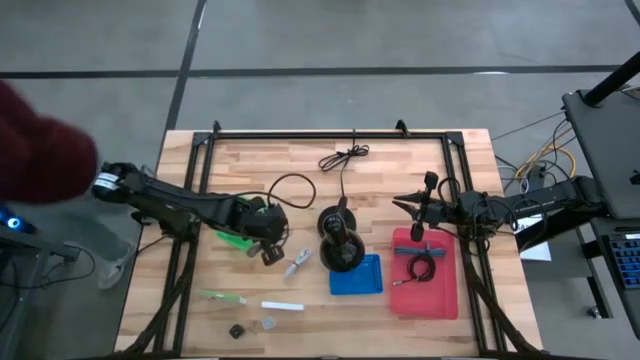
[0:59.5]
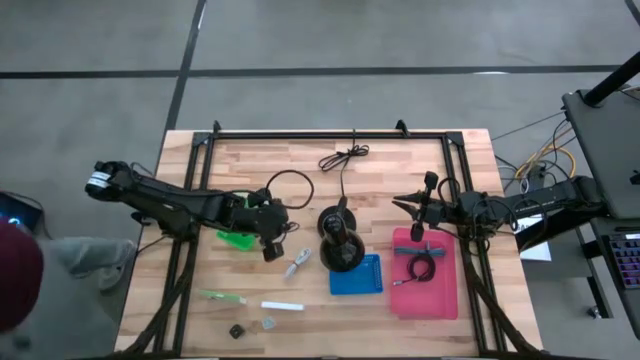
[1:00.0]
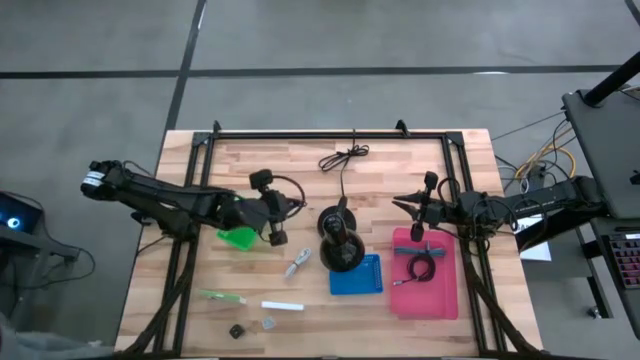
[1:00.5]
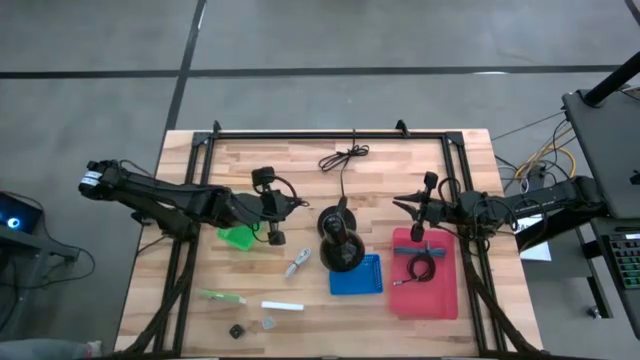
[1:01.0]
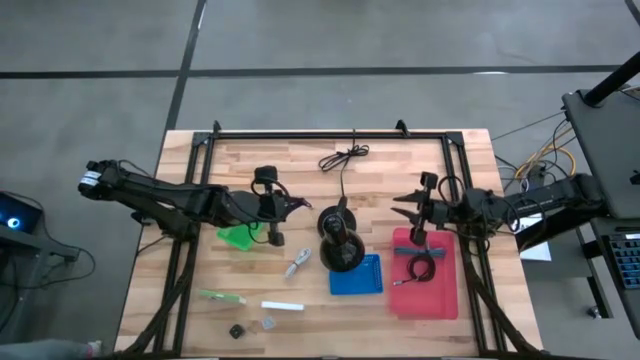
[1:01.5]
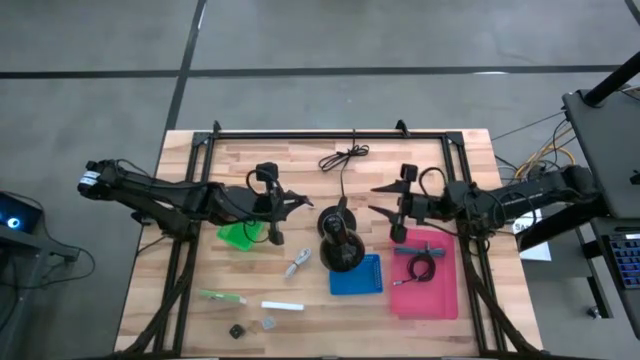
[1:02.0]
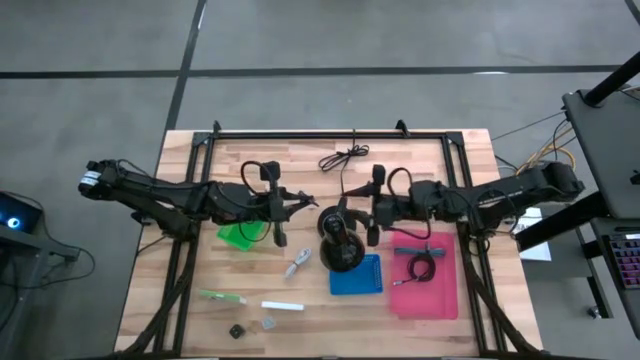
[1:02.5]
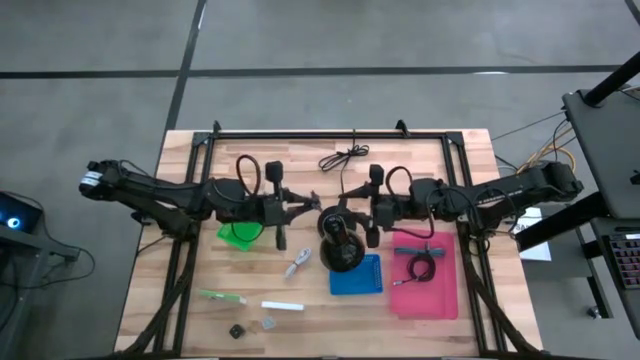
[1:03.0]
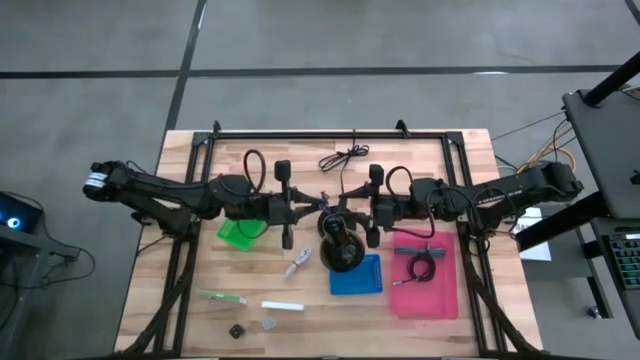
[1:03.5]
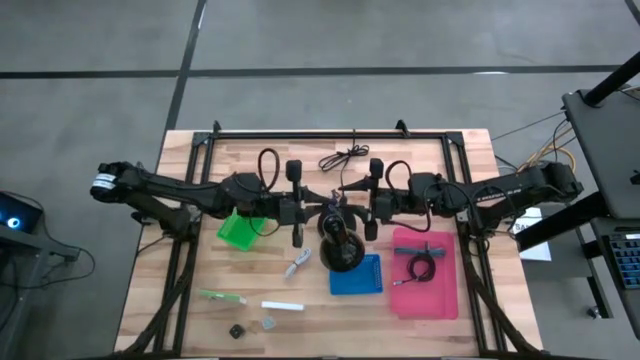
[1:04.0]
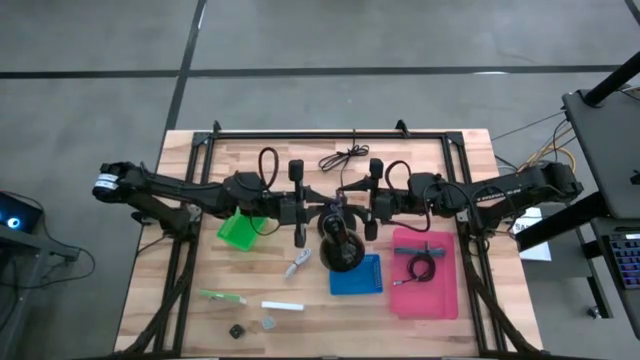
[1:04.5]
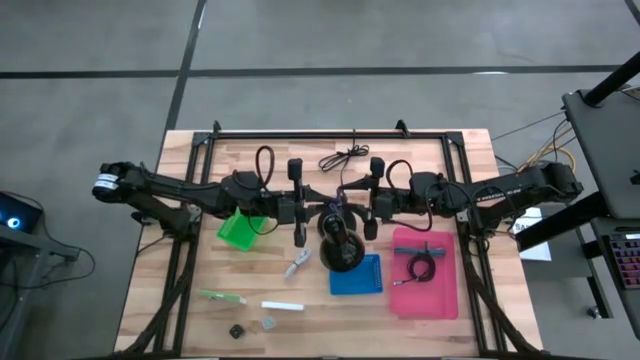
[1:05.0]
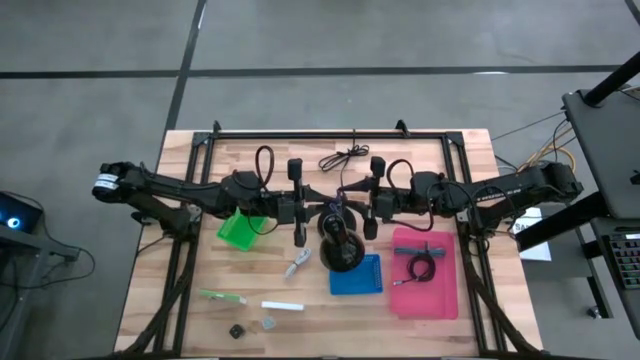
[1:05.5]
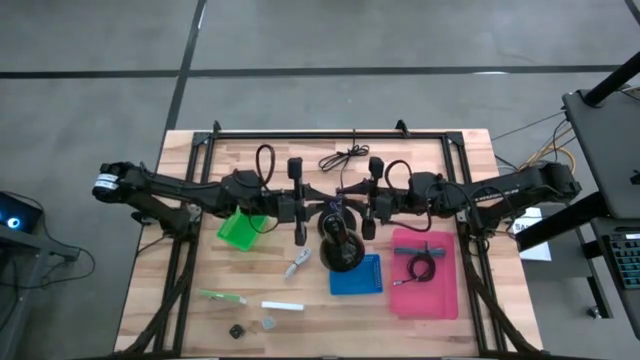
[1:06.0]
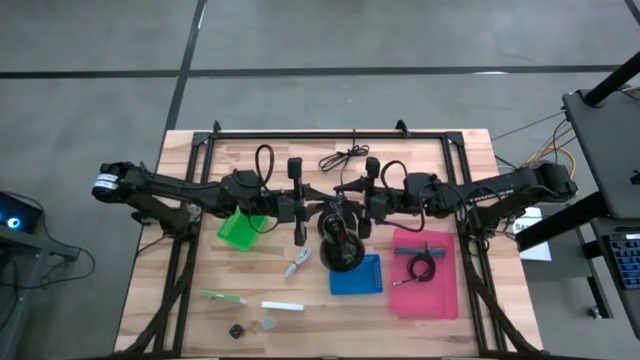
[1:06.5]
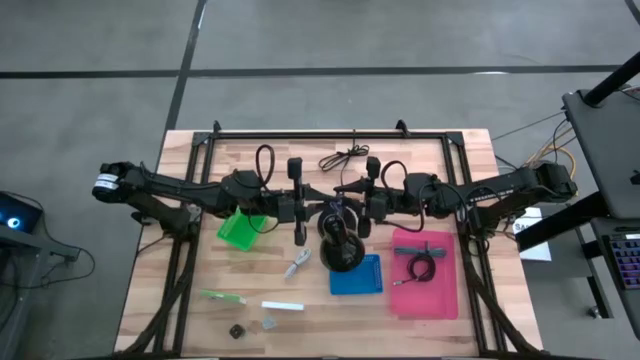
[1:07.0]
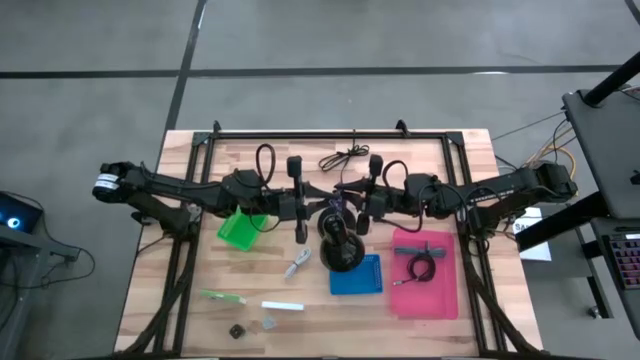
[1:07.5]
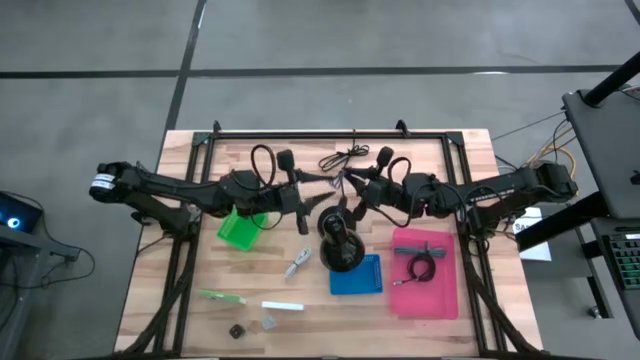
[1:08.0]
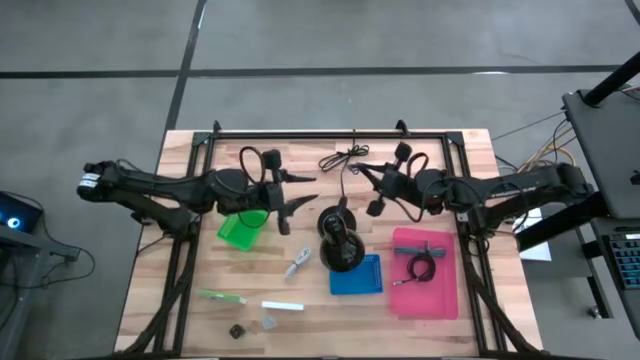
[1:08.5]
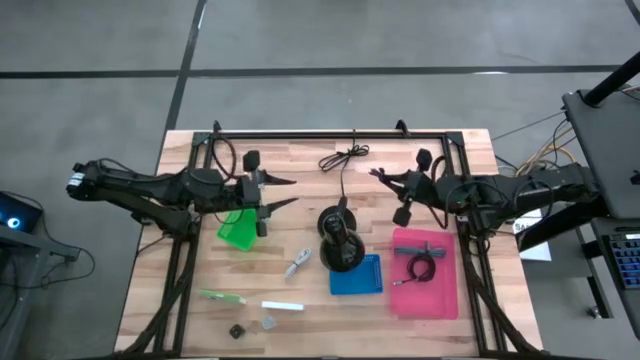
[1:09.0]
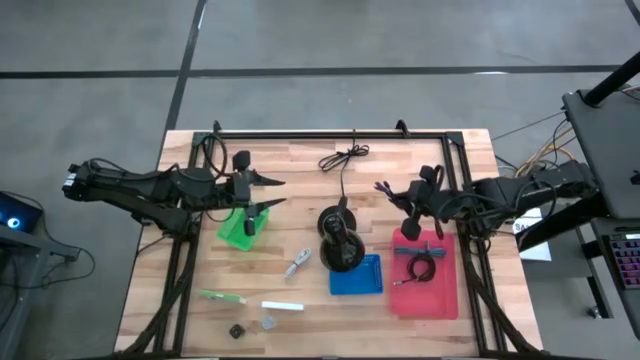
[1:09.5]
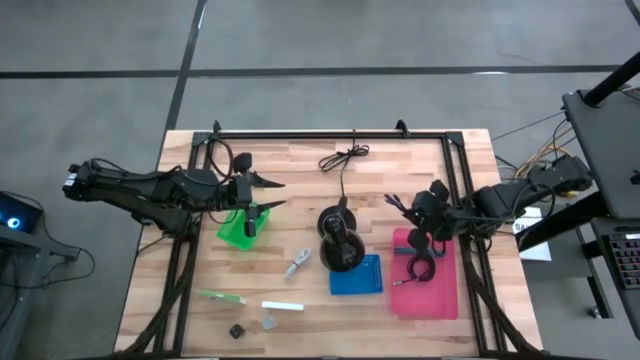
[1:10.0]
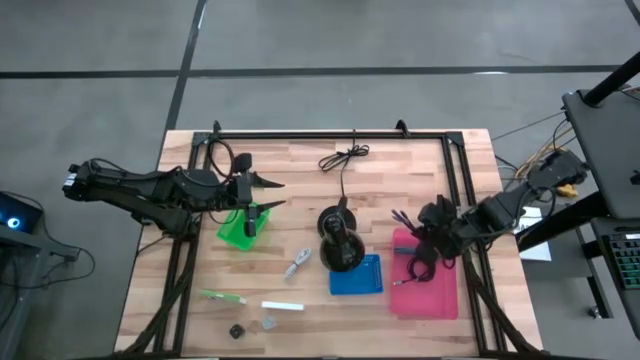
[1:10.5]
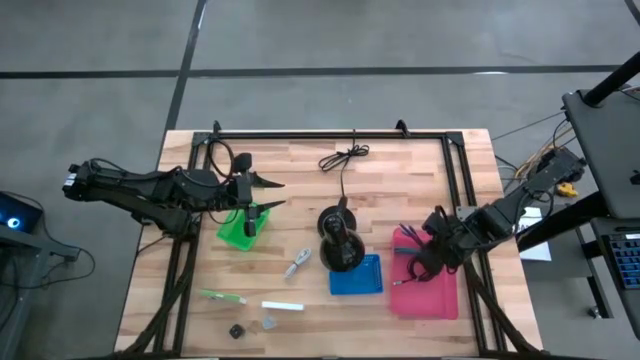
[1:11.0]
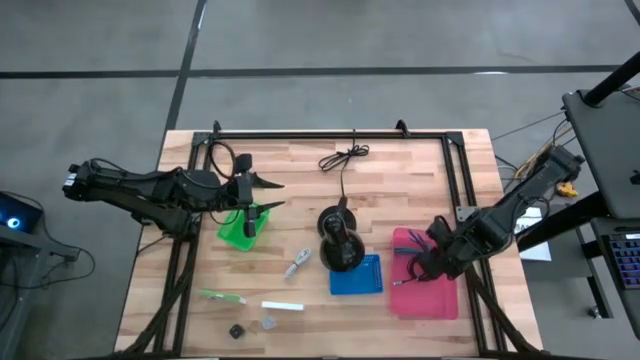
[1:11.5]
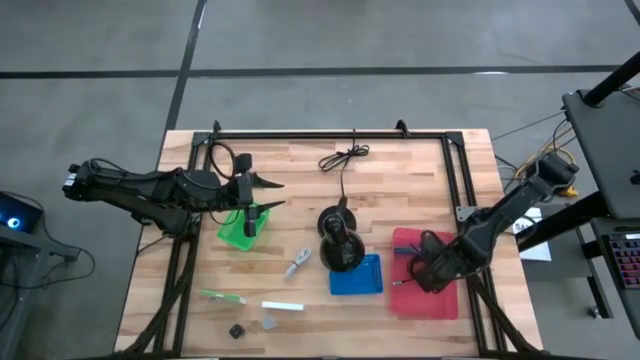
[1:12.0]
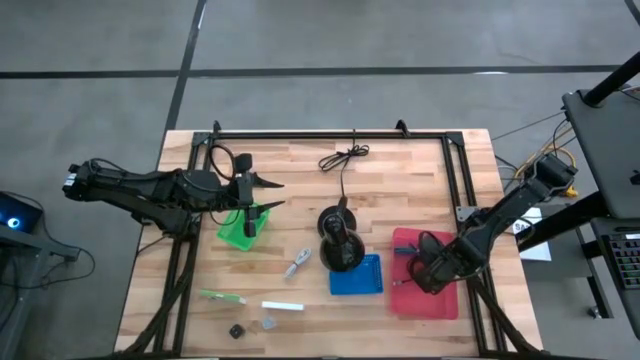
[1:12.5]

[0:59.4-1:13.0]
Task: Pick and place items into bin
Put the violet charger cable into the pink bin

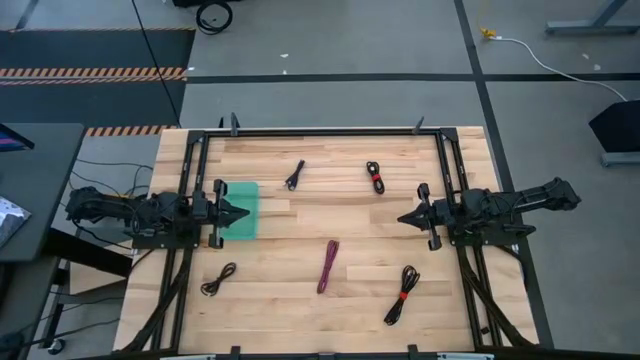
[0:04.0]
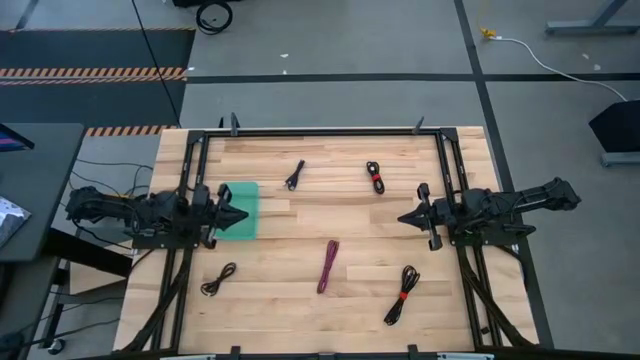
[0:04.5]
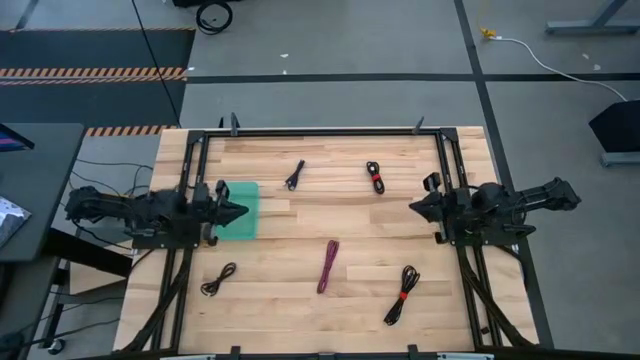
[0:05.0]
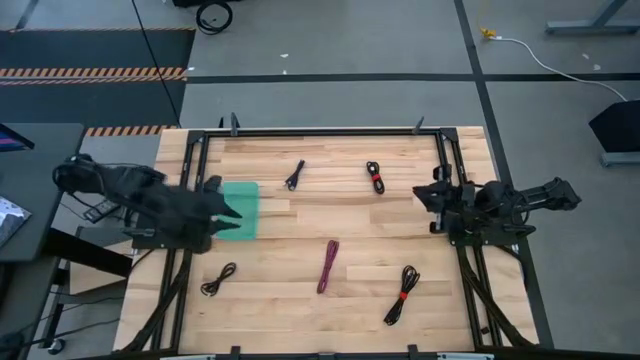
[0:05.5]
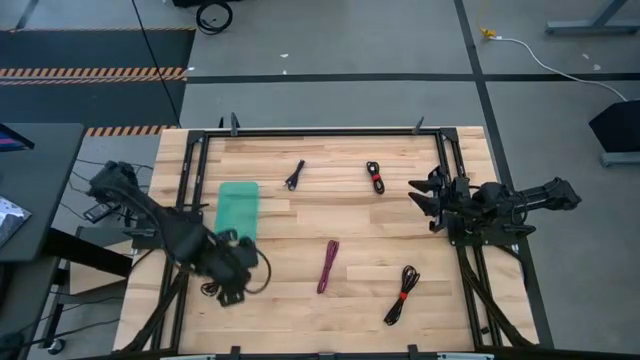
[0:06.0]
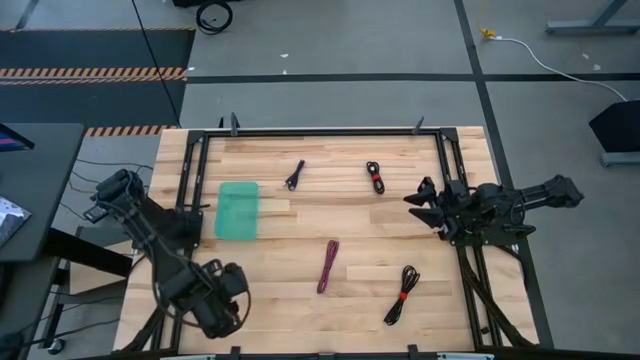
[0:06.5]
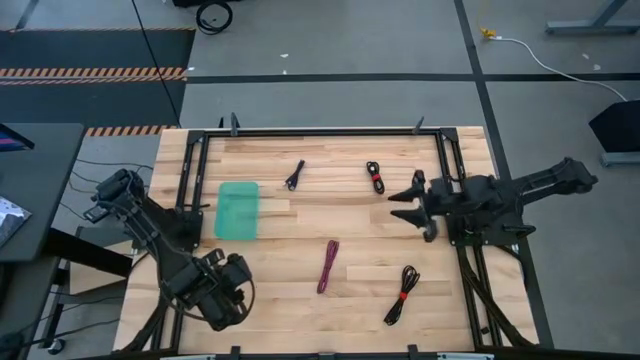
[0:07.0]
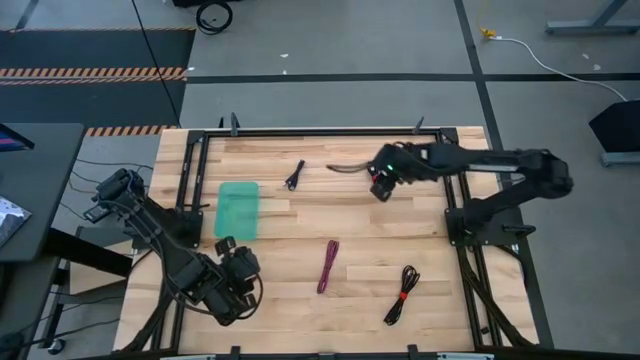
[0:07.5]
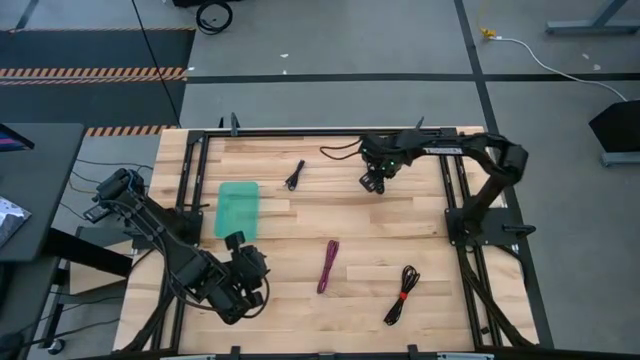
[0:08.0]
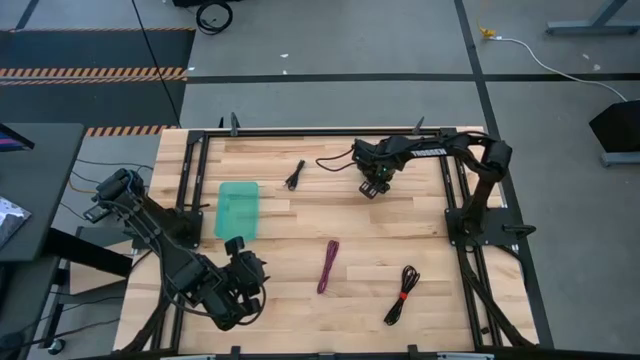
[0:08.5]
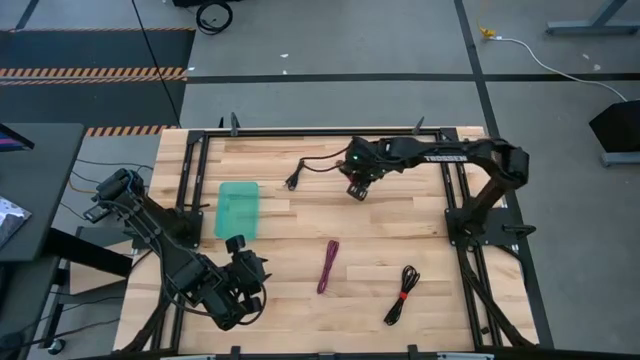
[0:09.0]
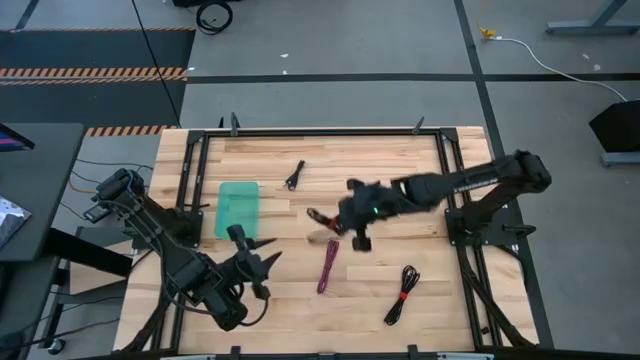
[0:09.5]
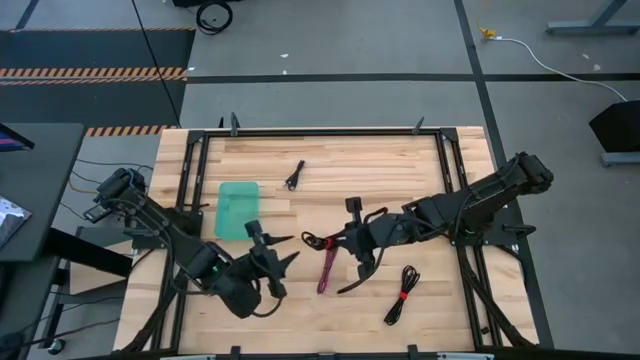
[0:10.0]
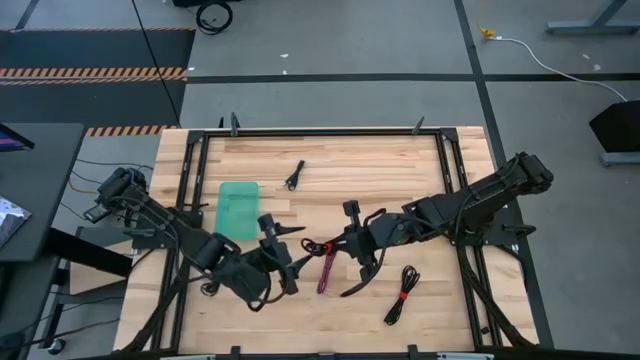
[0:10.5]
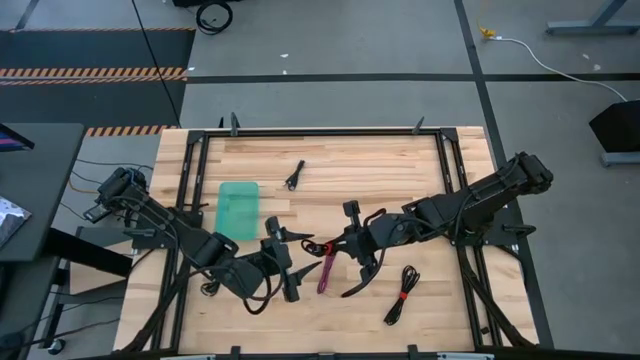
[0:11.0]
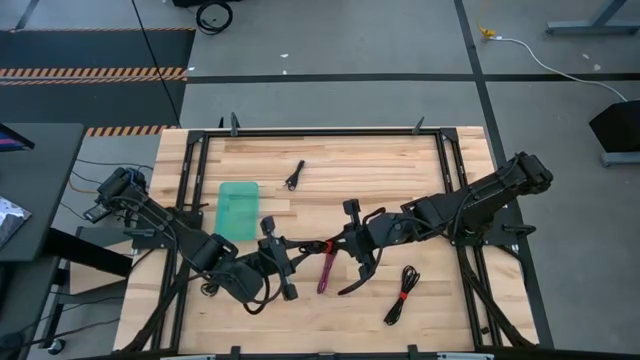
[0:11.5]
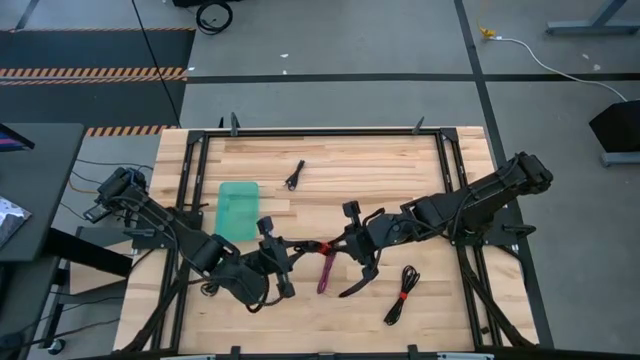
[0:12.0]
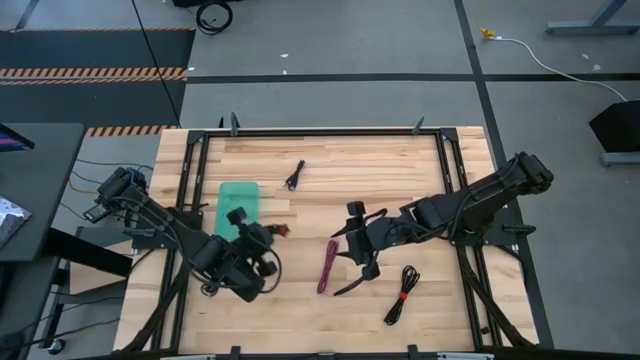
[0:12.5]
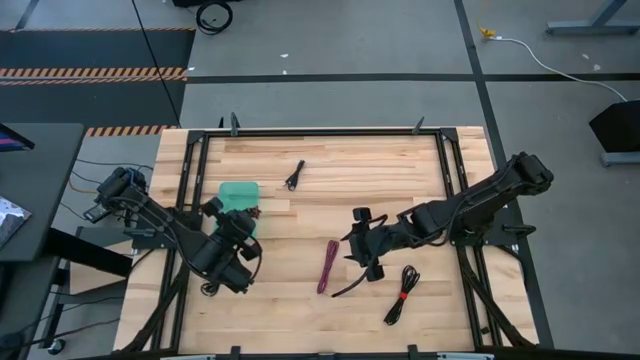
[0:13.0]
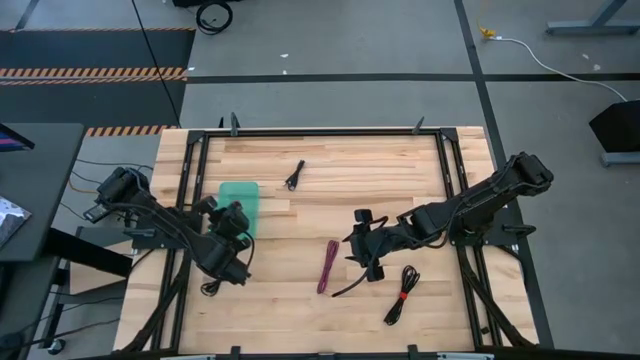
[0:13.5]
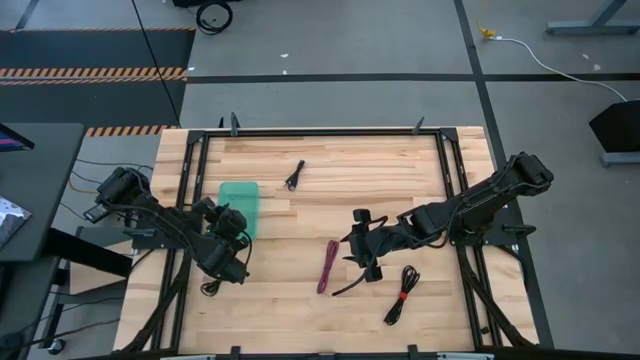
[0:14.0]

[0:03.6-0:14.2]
Task: Pick and place USB-C Cables
Put the black USB cable into the green bin
